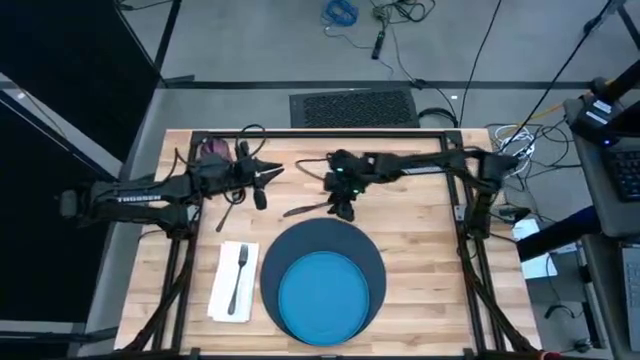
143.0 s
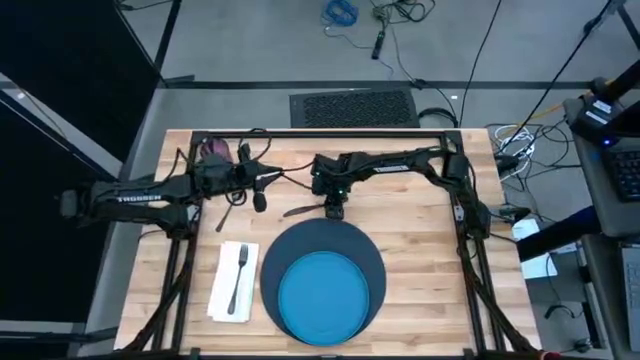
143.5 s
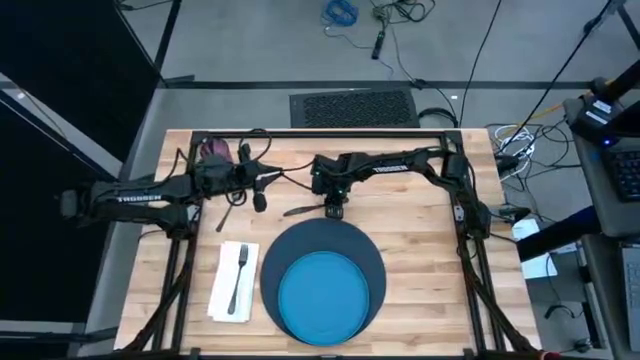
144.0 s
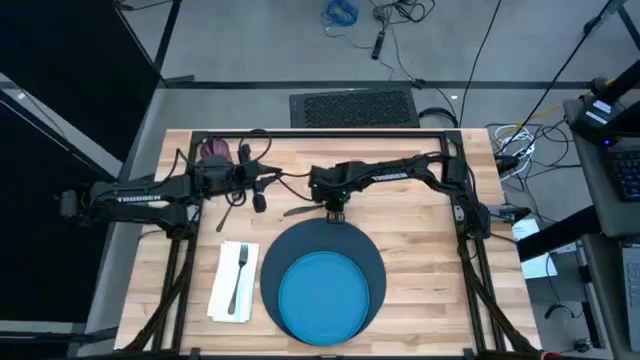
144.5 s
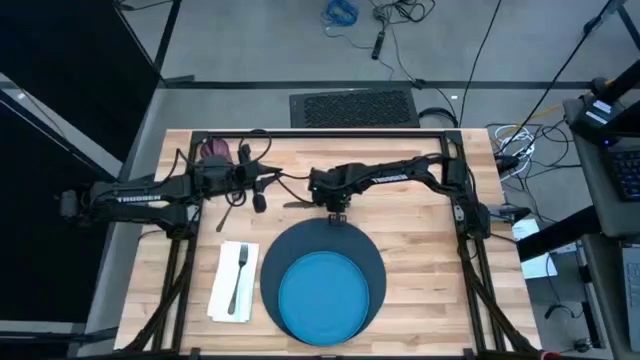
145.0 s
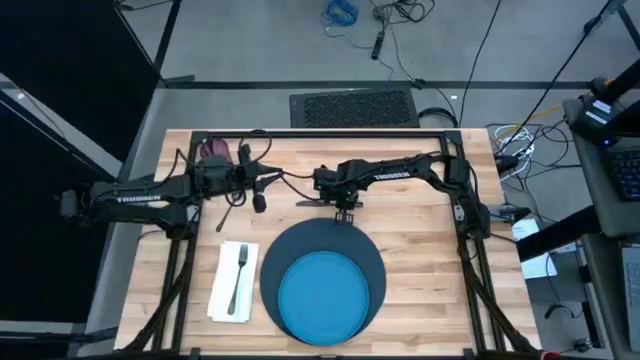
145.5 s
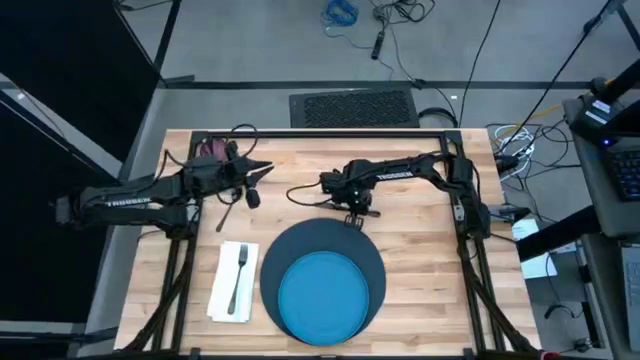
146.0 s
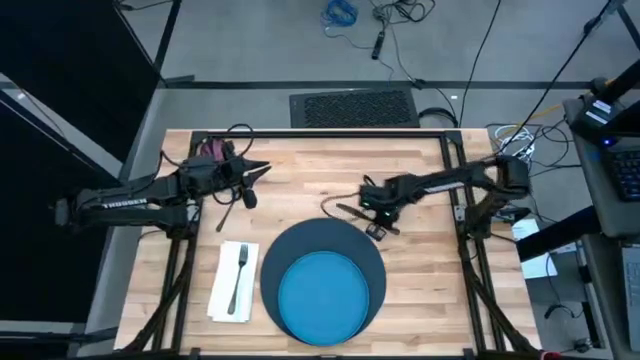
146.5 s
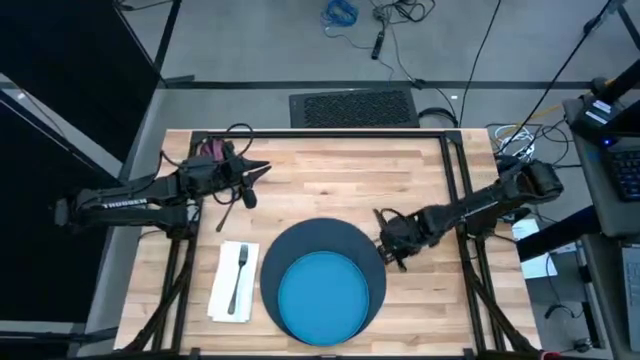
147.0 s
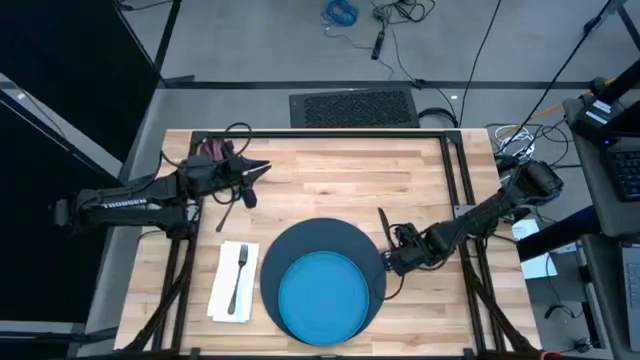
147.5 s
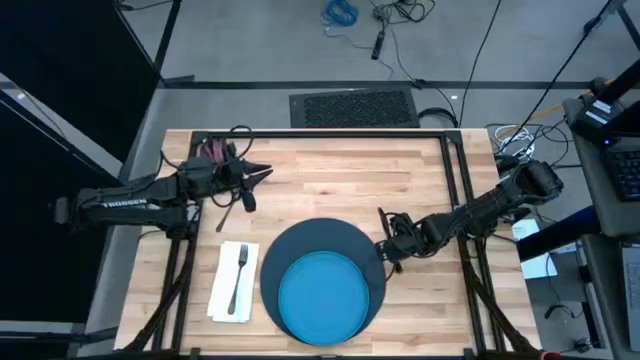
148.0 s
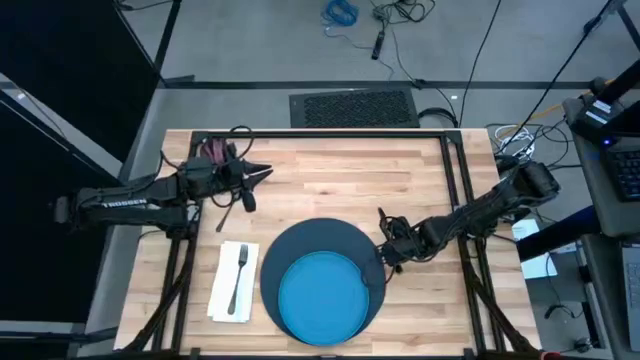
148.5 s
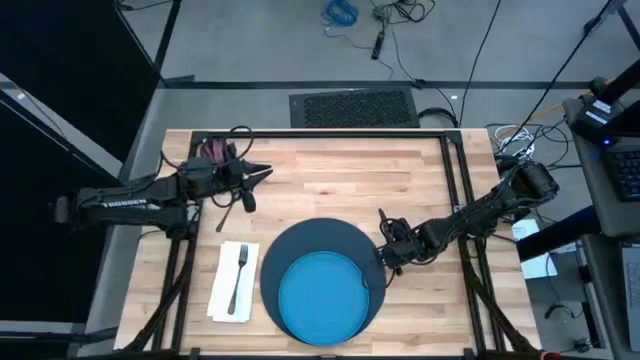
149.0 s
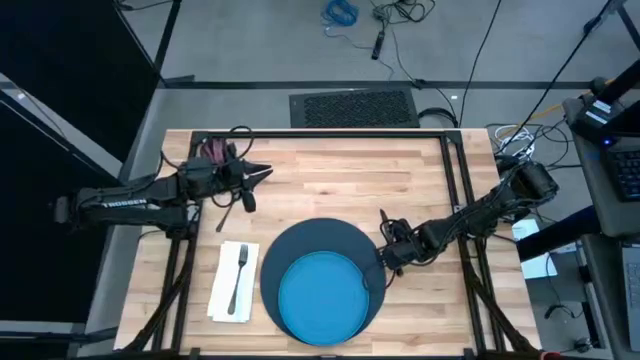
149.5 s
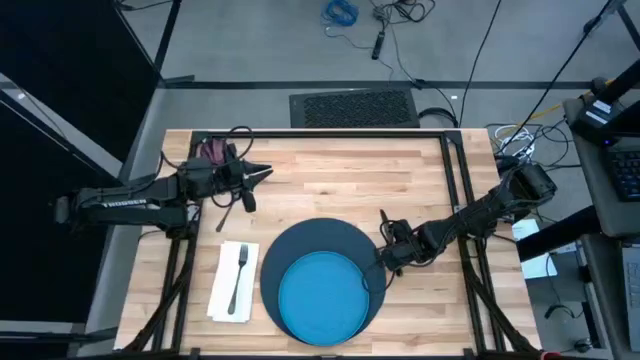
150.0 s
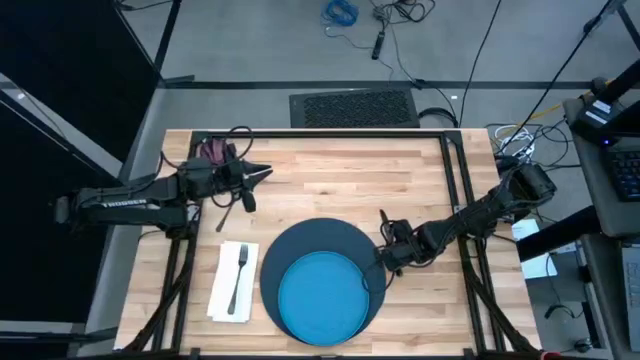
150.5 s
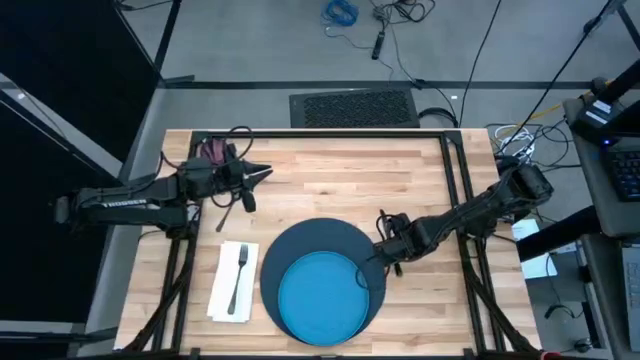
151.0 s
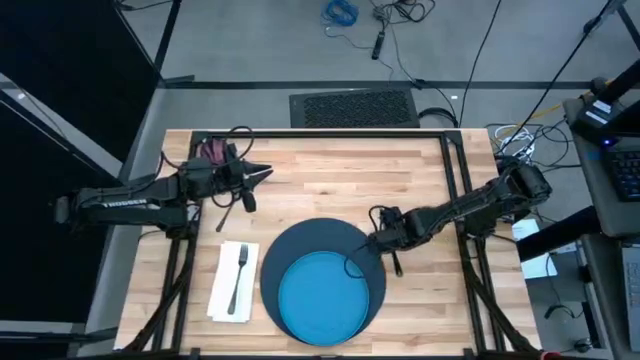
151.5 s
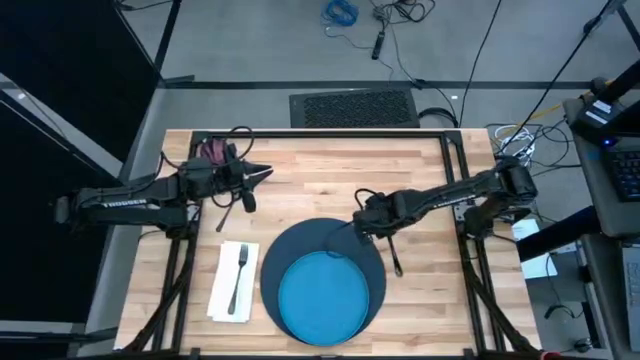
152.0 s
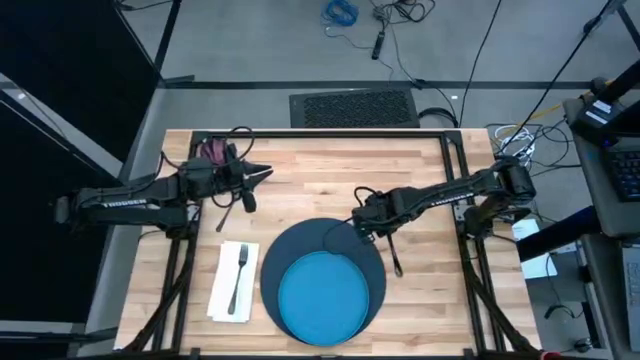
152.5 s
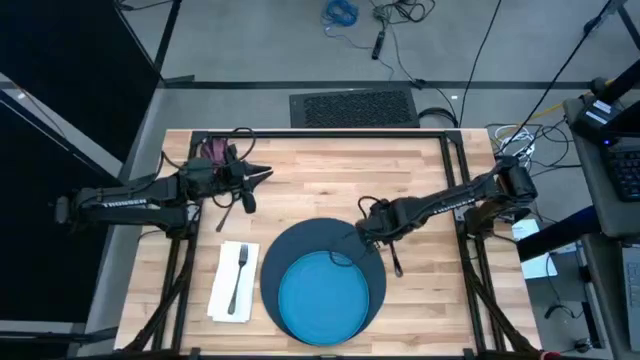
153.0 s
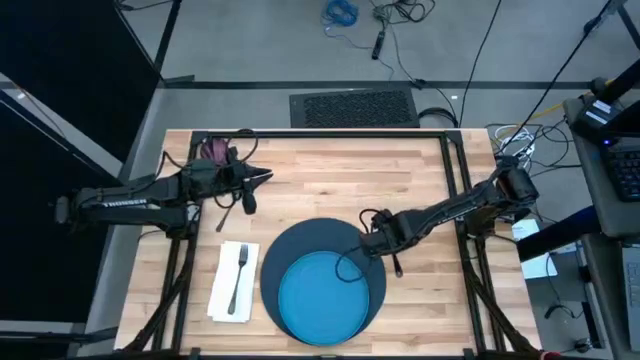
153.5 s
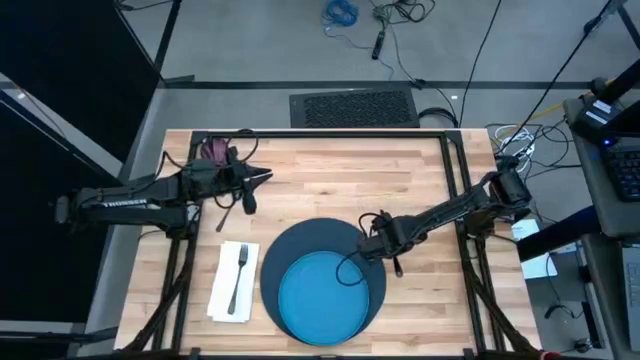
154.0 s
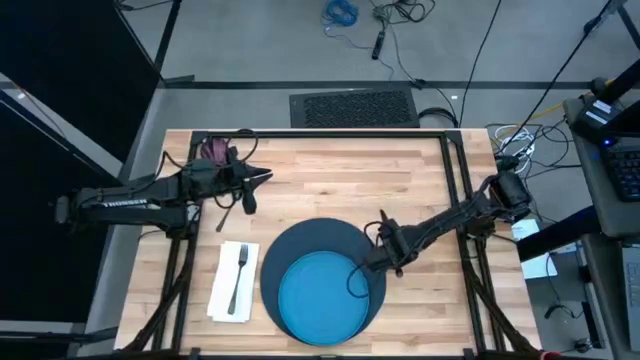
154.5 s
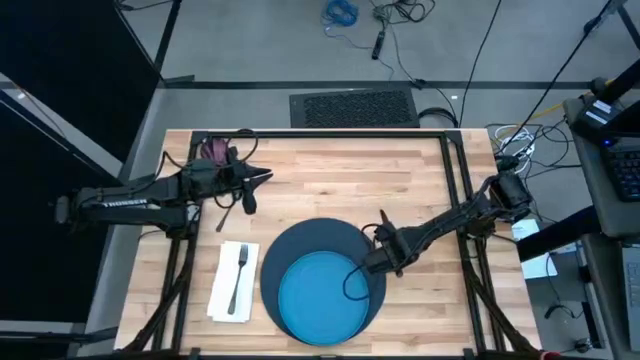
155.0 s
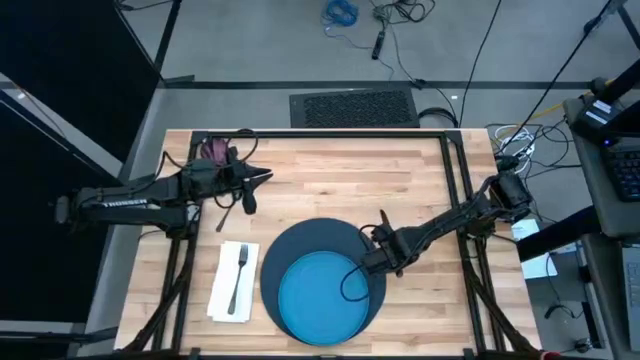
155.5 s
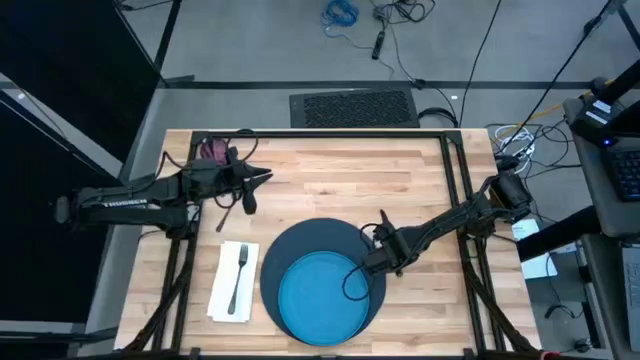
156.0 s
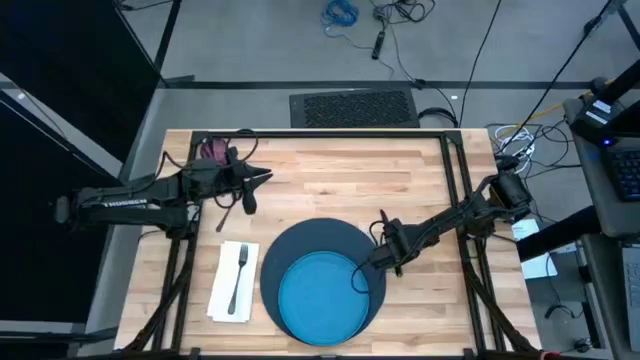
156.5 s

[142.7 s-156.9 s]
Task: Set table place
Move the table knife to the right of the table mat

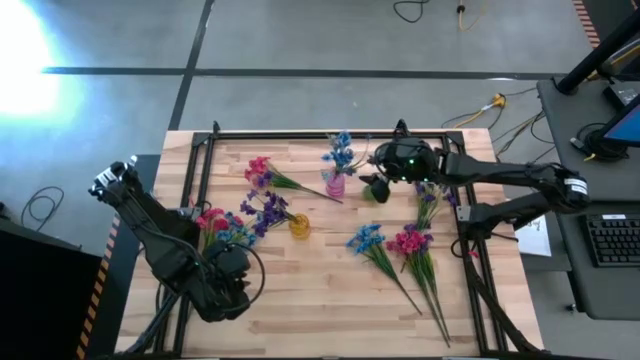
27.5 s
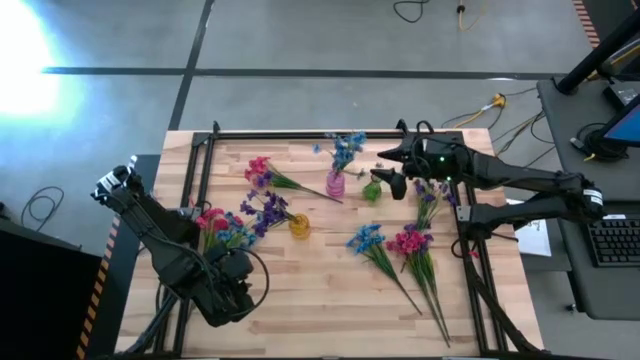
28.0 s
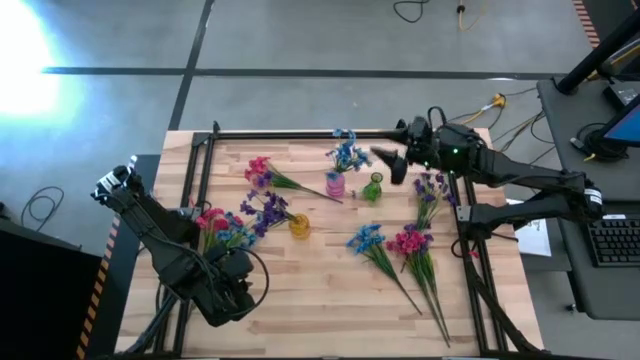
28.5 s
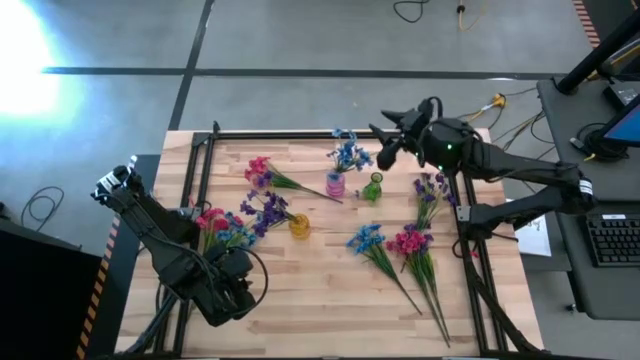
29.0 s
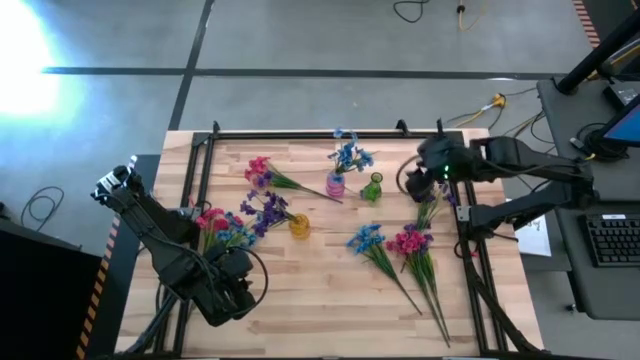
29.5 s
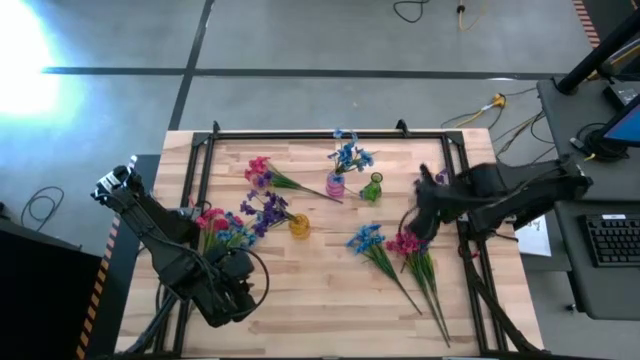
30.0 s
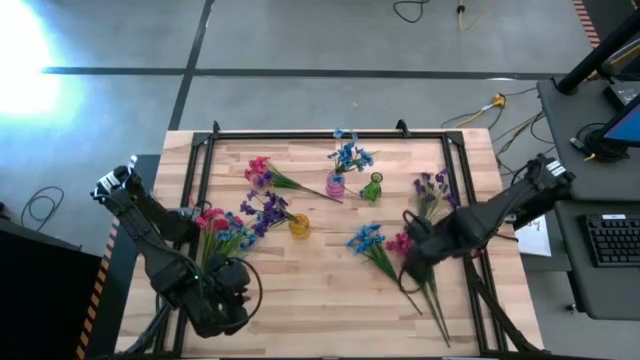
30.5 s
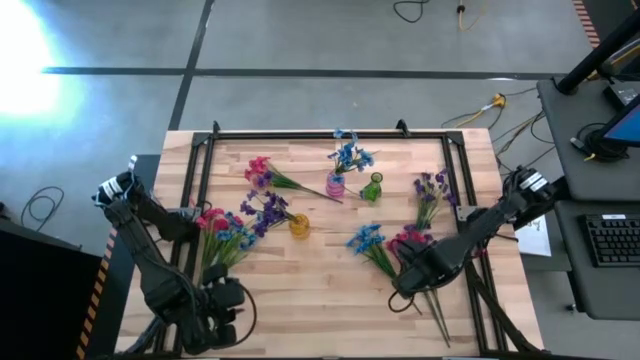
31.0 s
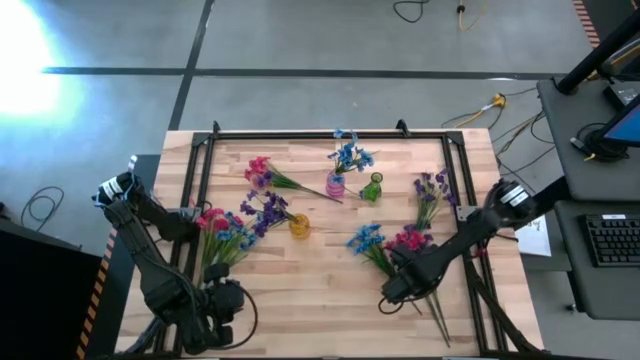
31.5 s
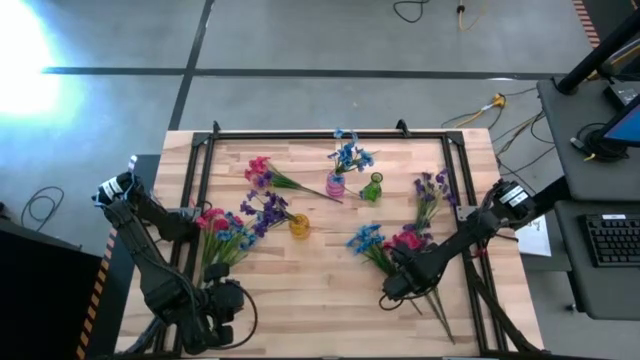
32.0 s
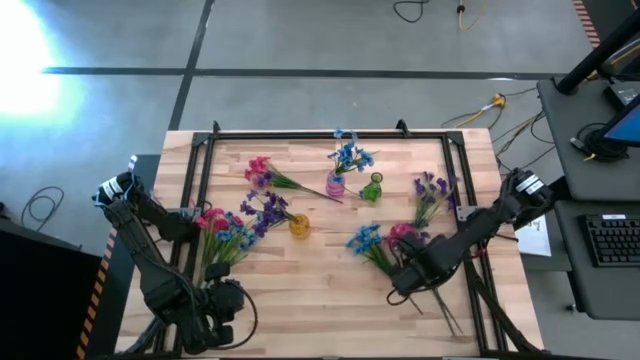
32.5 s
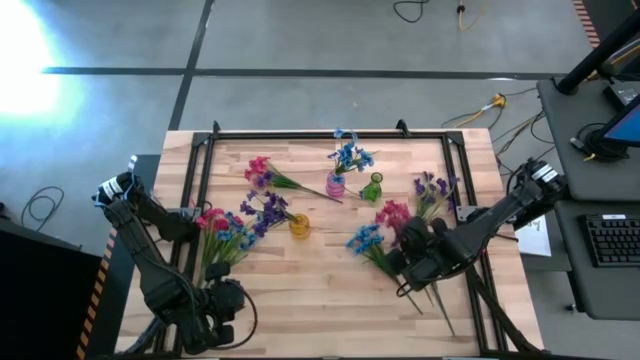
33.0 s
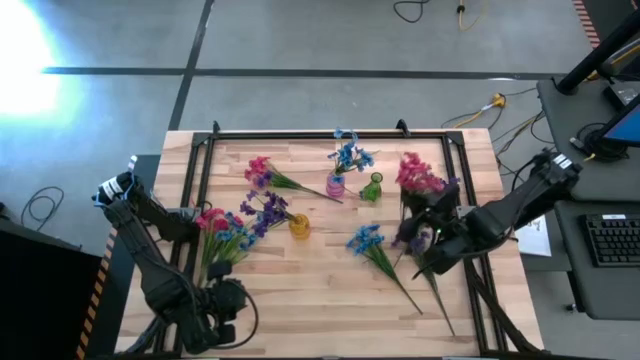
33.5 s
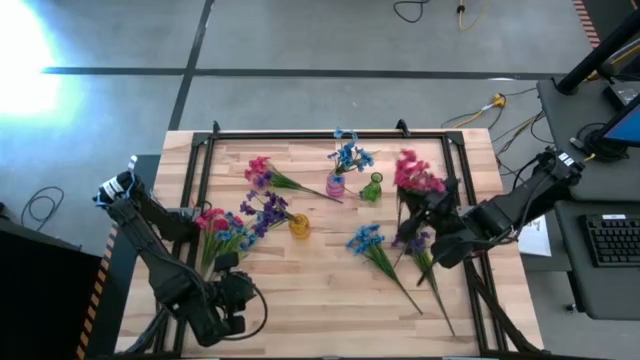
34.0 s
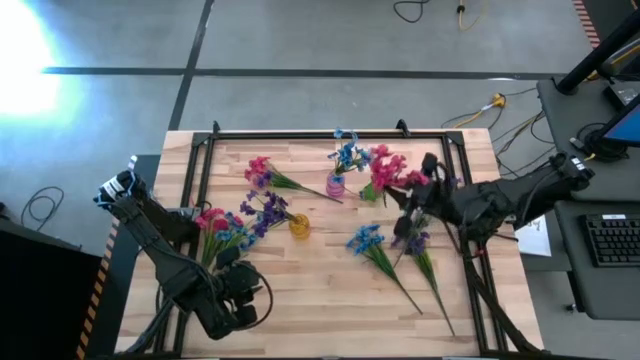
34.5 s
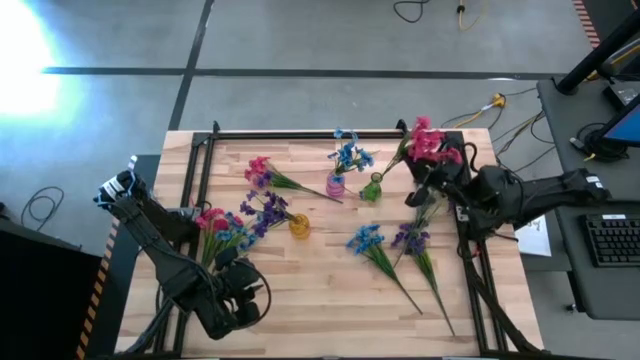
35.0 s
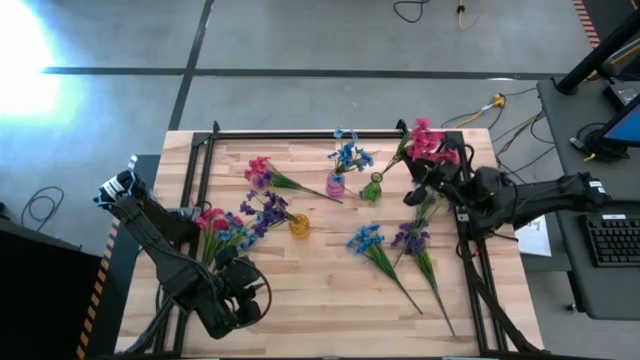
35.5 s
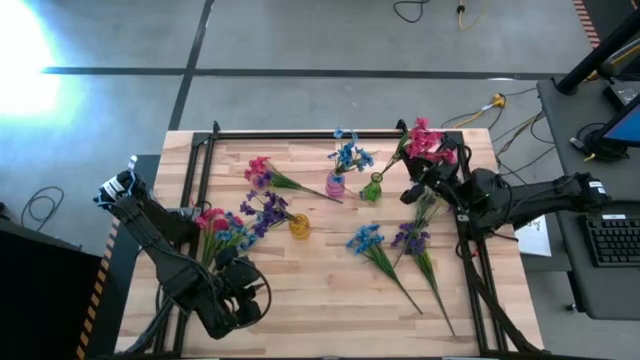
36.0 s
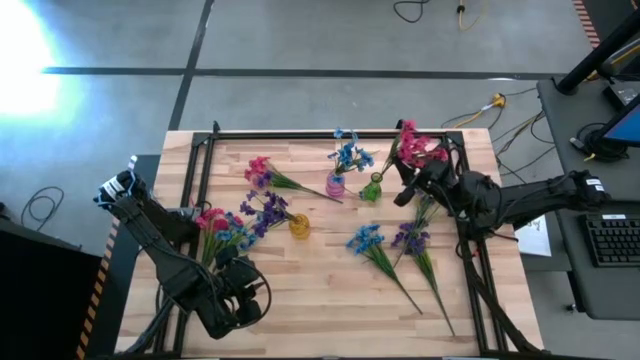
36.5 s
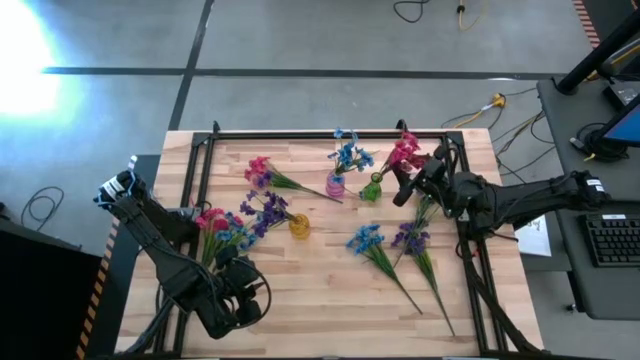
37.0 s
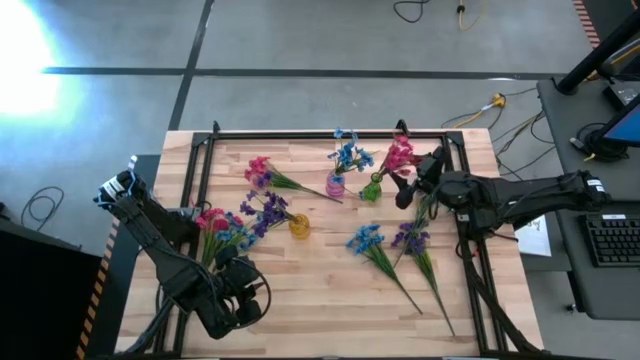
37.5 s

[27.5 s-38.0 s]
Task: Sort flowers into vase by color
Put the bottom right pink flowers into the green vase
